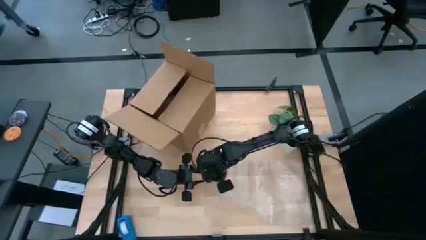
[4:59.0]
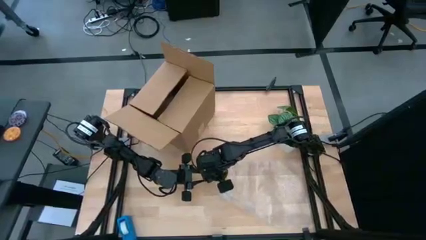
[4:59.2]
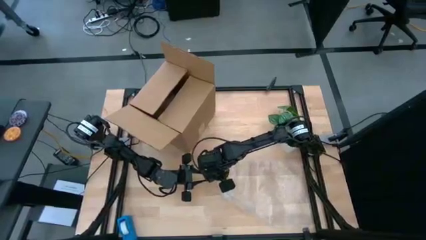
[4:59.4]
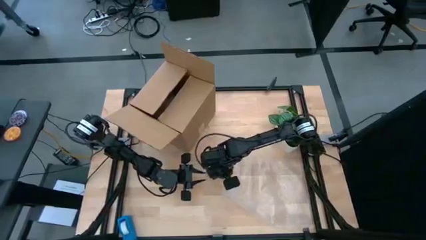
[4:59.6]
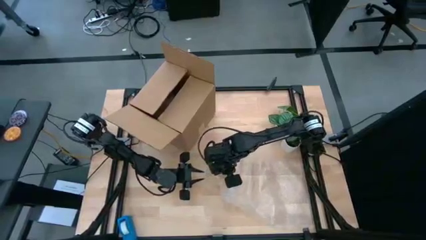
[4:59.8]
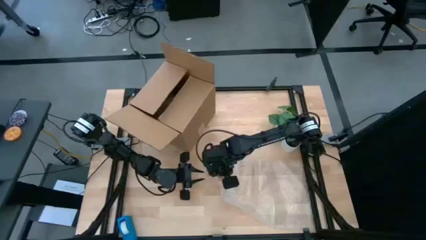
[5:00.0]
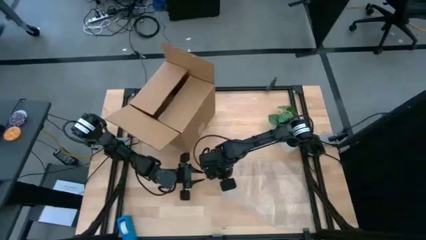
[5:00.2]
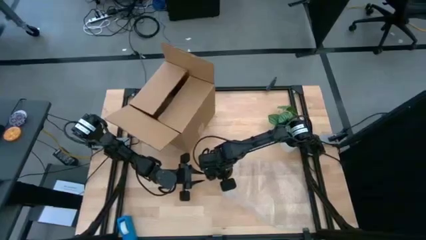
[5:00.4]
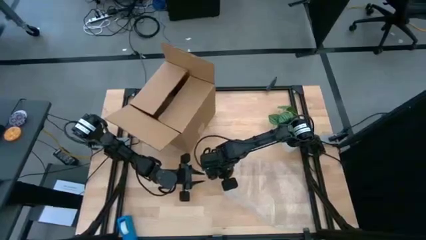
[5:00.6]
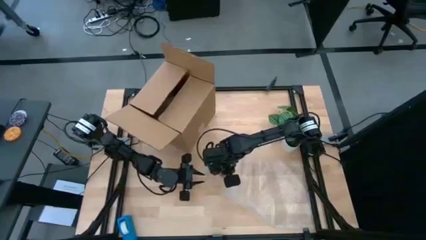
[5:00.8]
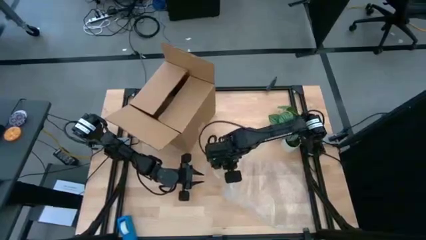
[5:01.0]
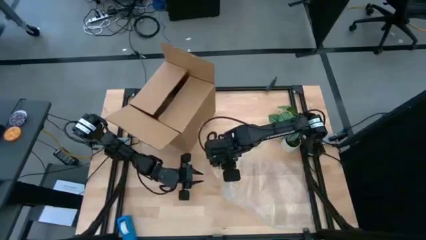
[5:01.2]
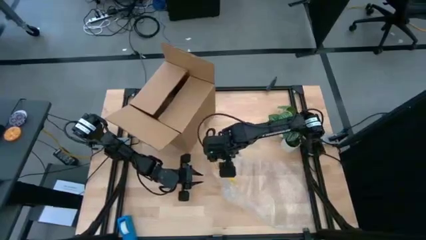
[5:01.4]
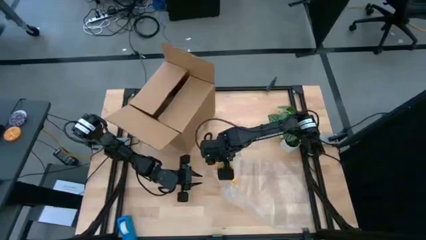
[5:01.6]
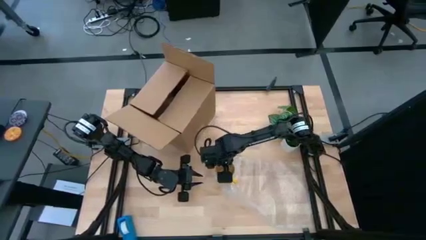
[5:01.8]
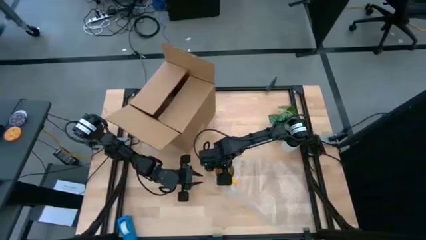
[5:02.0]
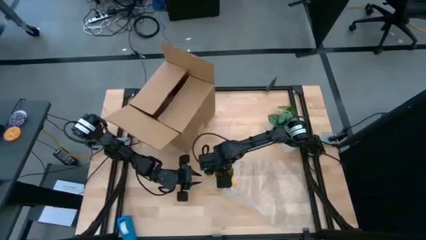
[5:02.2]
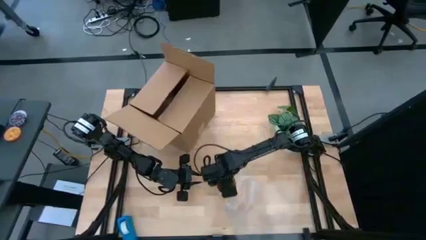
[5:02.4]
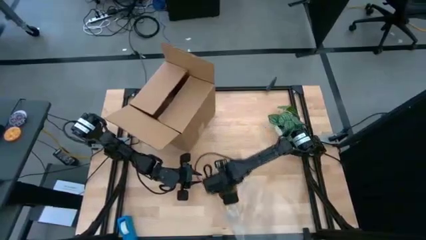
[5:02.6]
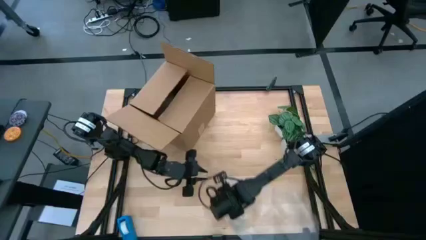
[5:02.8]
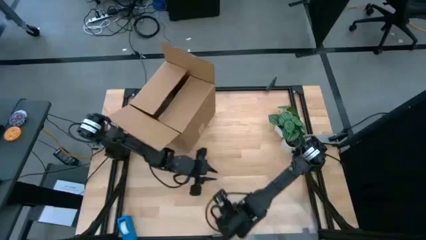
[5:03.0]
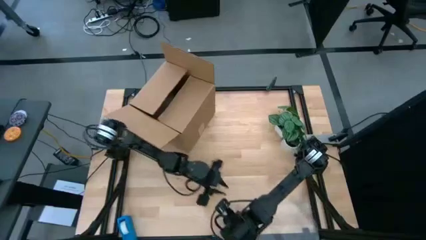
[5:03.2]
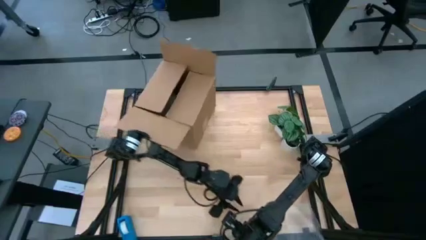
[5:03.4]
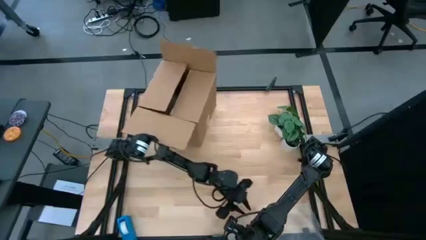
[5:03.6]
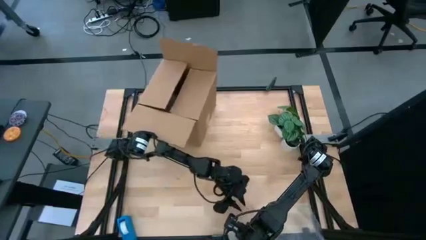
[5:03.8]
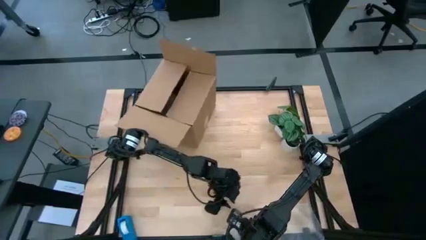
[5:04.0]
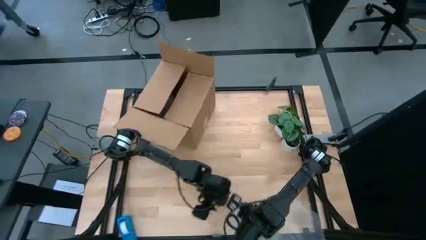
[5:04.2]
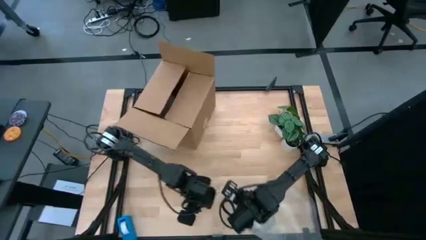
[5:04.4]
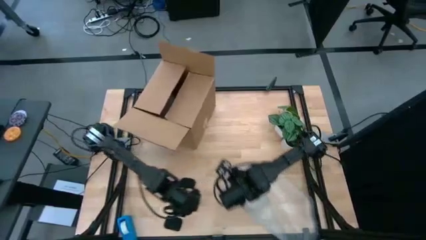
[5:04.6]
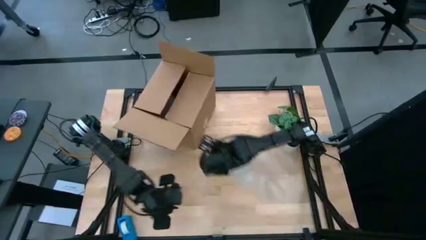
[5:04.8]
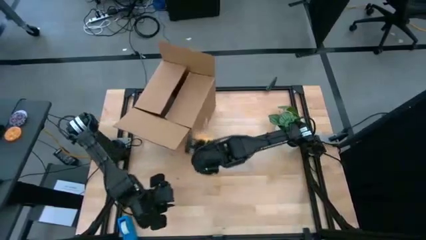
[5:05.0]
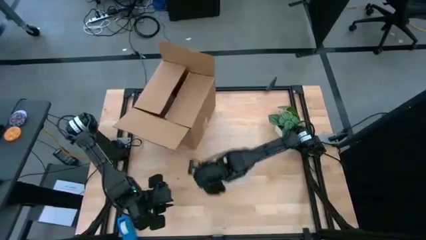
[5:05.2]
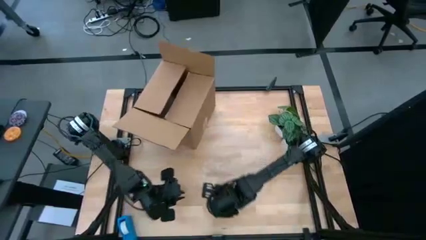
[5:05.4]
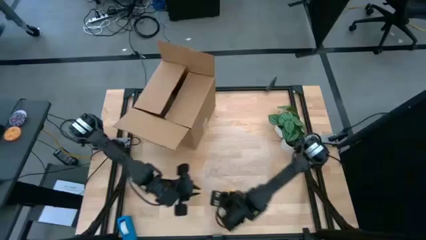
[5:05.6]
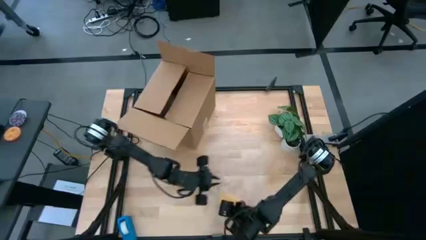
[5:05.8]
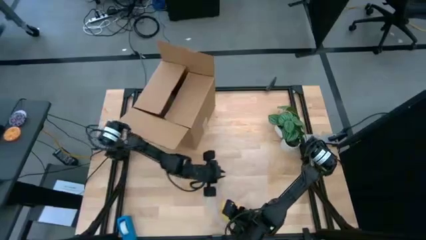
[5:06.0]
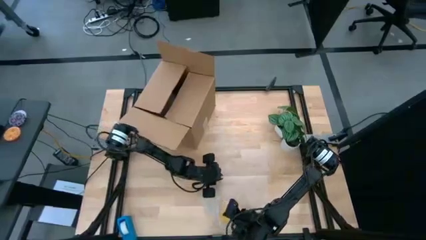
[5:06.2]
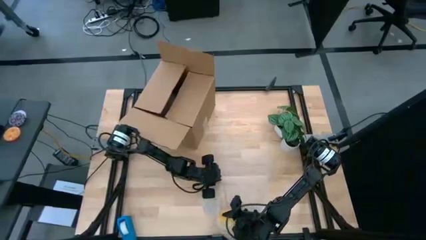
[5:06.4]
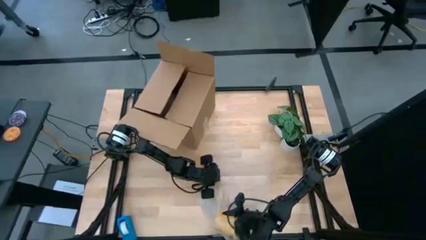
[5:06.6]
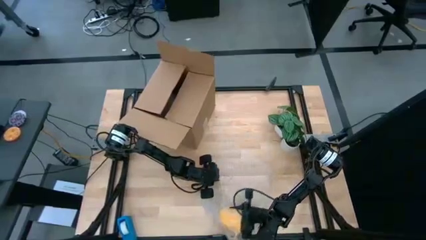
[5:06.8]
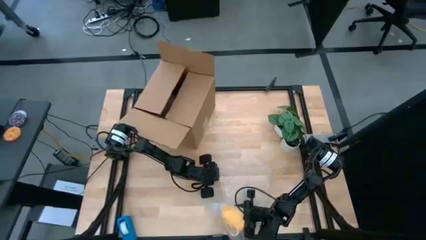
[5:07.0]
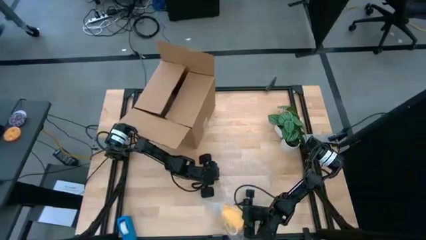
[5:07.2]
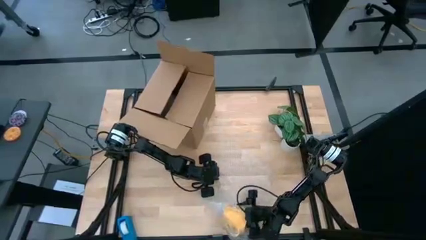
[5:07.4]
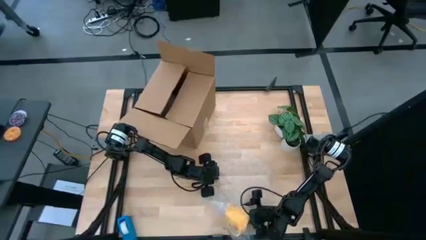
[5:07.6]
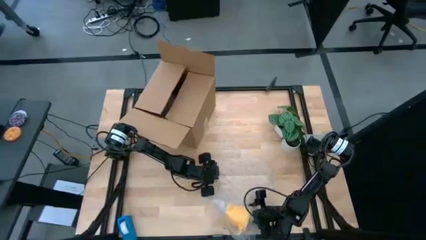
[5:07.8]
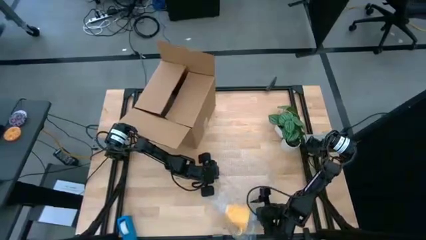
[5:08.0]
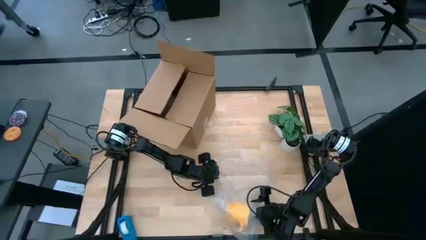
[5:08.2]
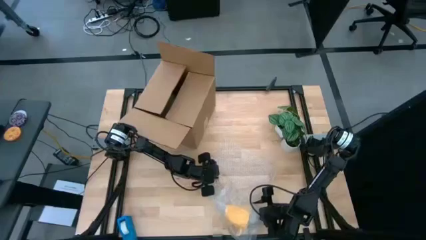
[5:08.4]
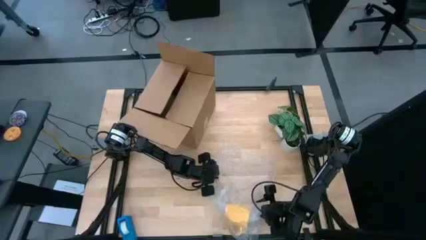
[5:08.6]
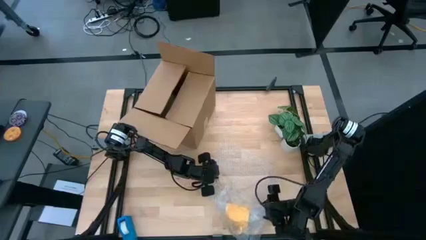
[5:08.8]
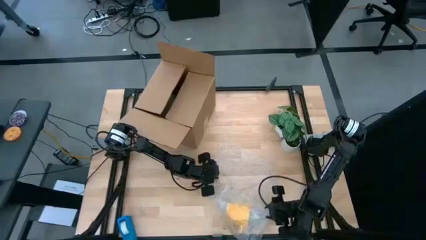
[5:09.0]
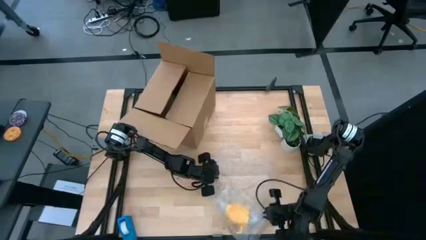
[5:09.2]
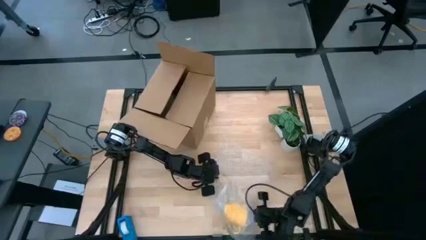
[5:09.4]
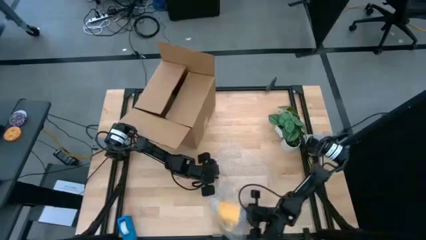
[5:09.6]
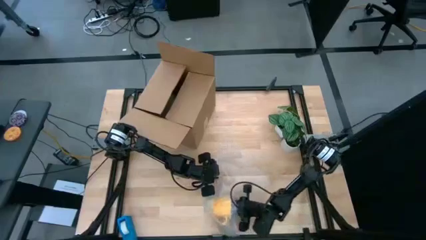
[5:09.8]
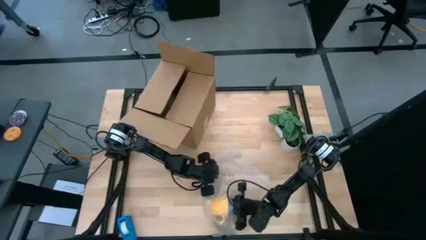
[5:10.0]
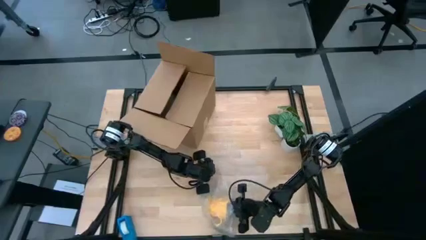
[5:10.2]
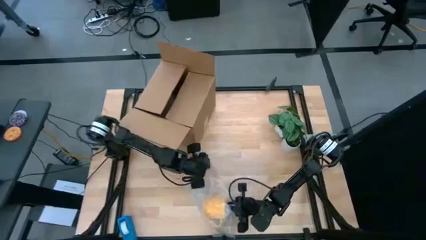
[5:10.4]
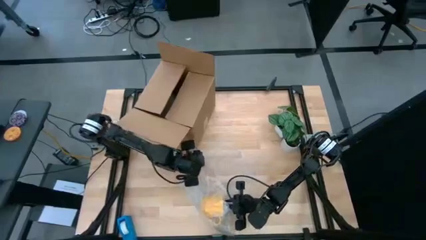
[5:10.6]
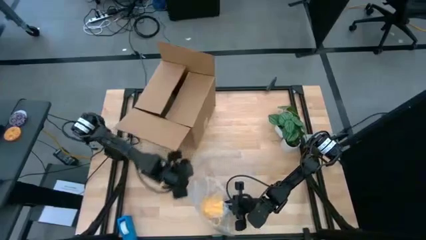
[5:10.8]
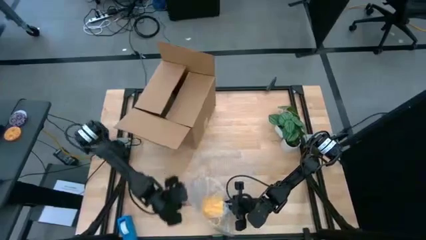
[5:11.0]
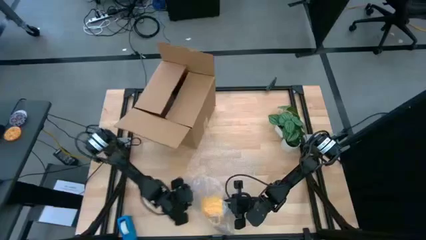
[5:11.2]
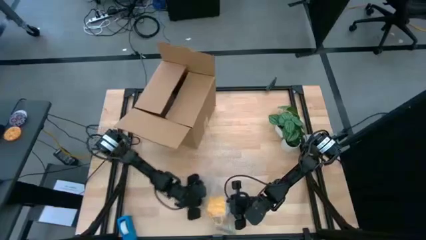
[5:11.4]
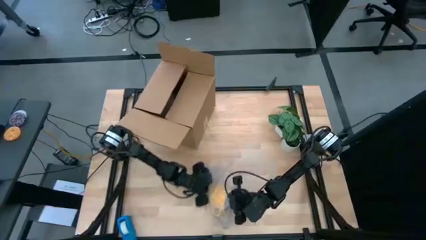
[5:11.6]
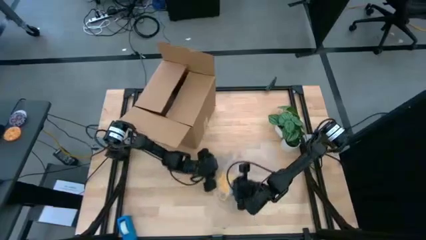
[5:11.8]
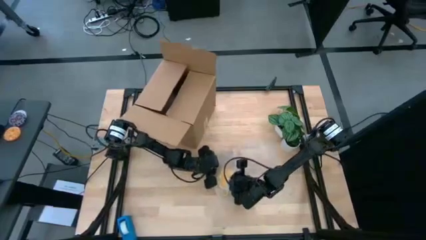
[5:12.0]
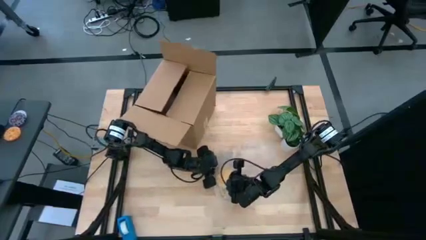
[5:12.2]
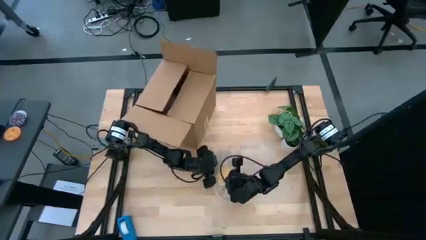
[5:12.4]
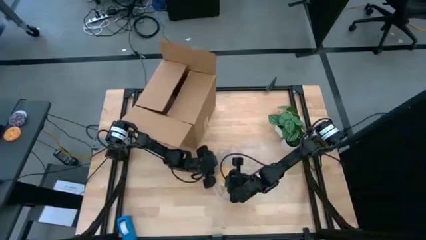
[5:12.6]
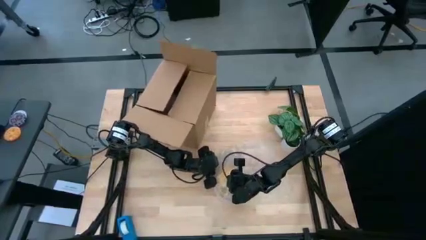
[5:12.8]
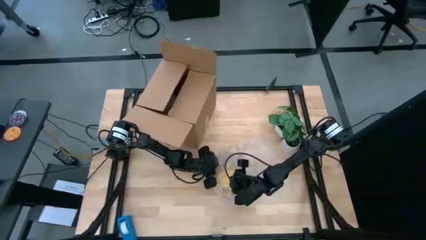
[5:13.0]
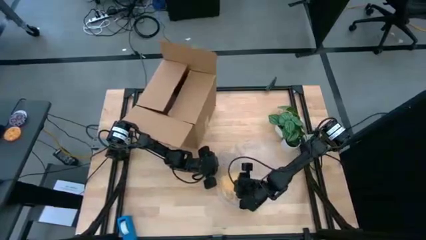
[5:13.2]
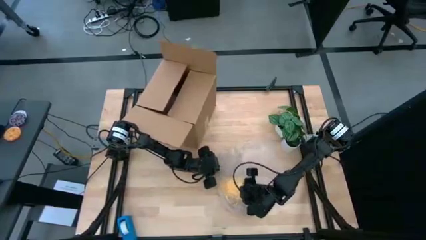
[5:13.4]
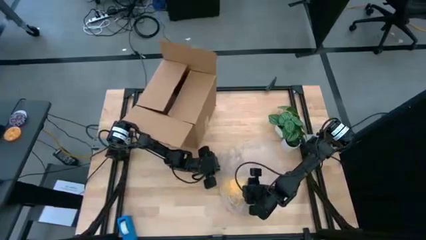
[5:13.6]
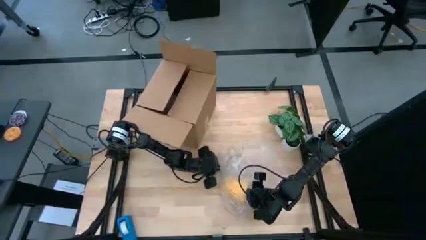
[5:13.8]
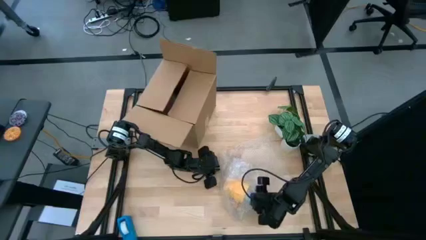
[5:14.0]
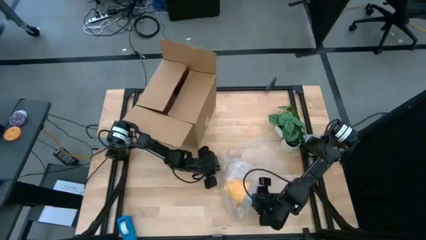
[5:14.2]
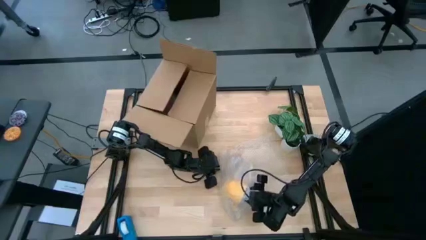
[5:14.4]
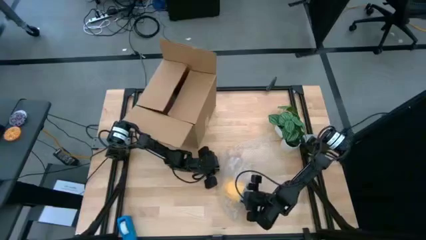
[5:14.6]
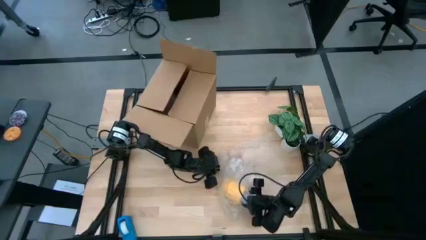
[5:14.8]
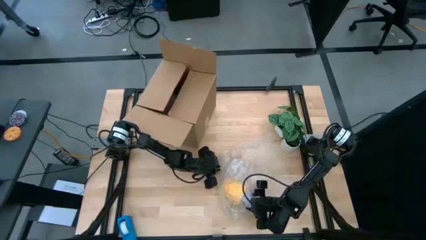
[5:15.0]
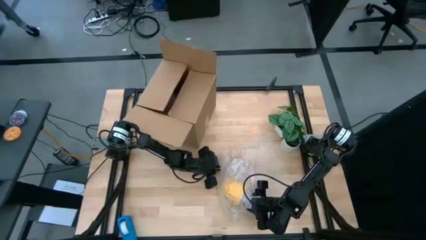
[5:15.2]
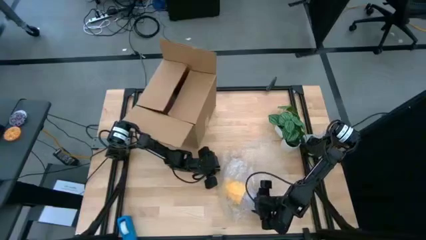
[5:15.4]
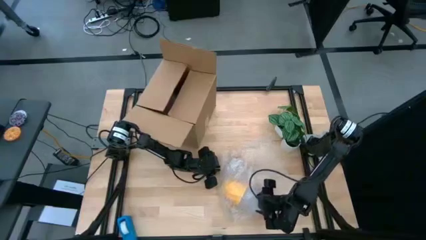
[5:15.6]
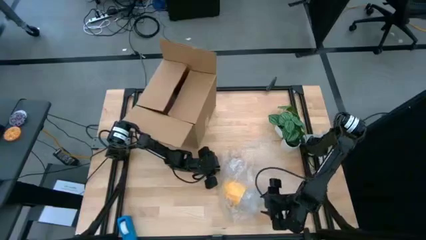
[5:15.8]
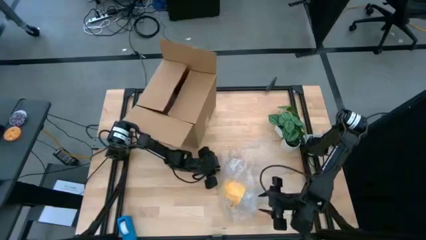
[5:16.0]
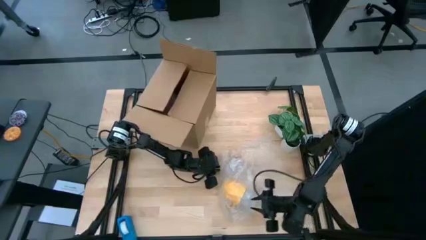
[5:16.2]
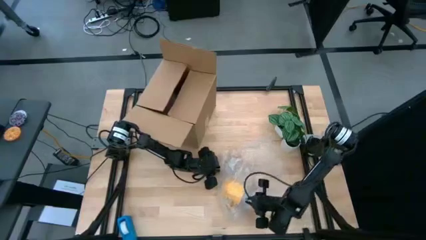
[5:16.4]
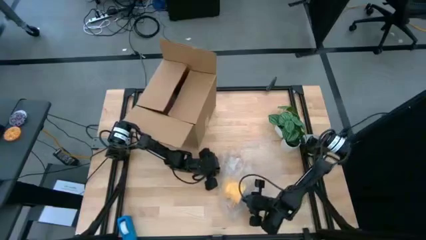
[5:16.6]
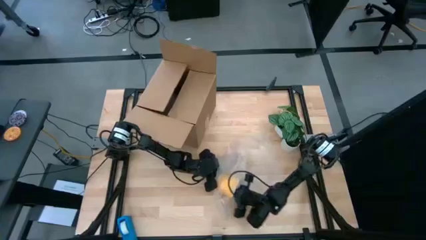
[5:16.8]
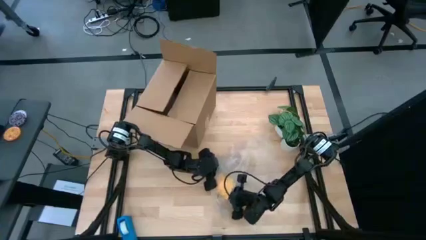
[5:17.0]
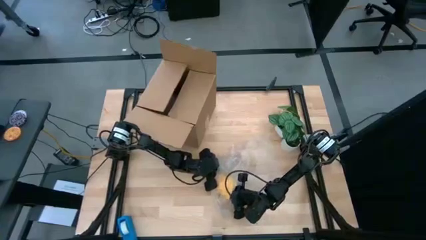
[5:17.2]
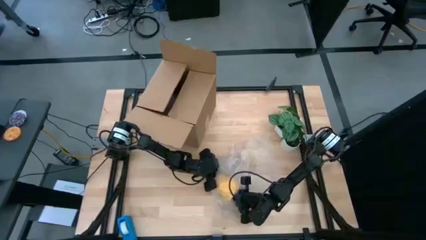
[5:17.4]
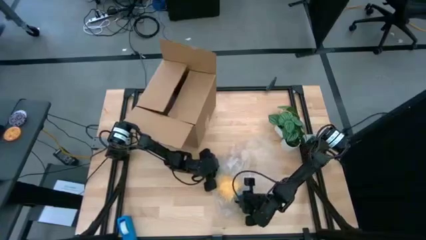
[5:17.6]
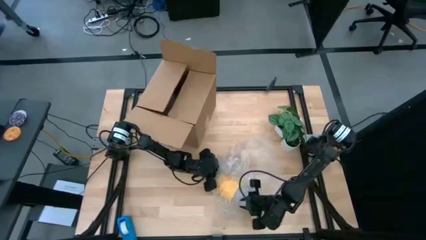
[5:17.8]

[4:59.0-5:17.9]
Task: wrap mug
Wrap the yellow mug with the bubble wrap
